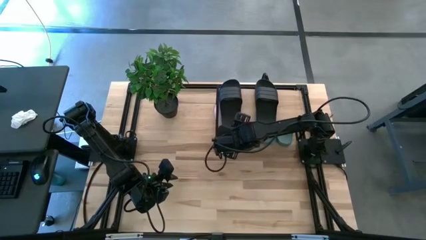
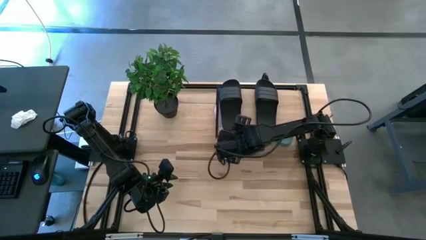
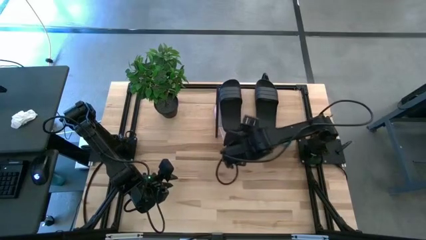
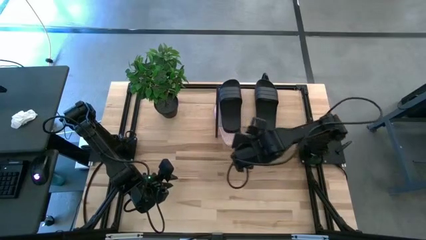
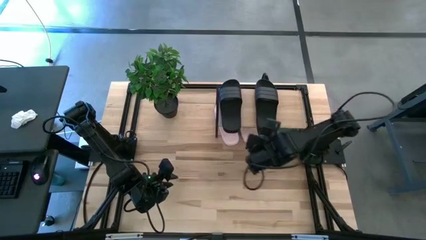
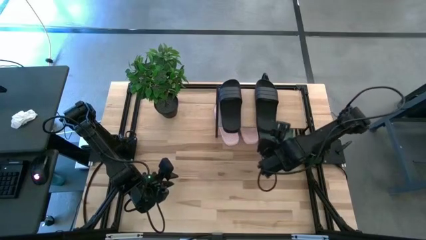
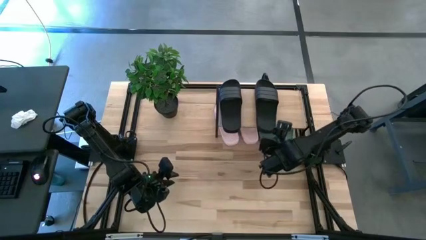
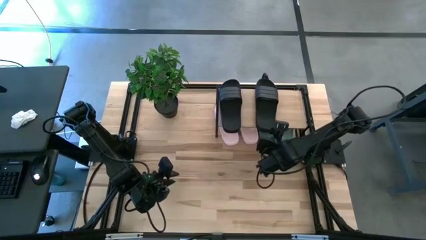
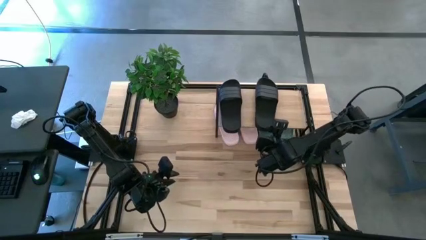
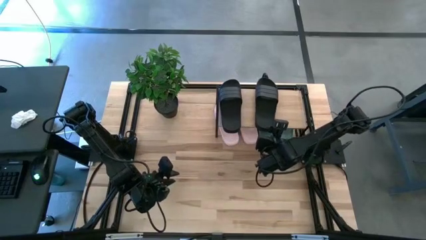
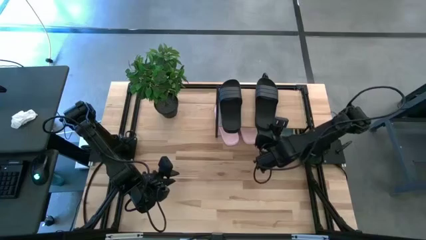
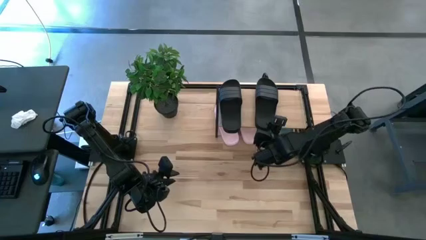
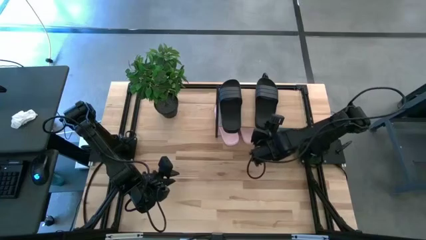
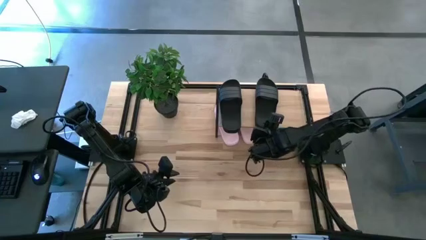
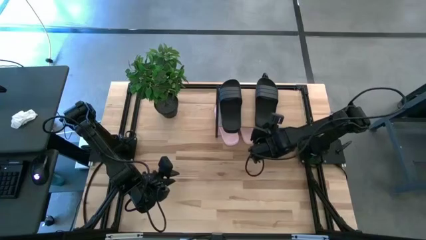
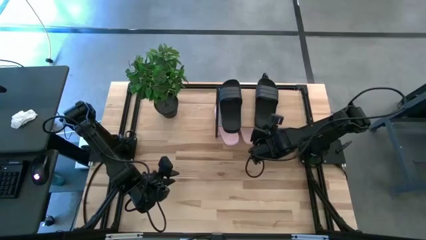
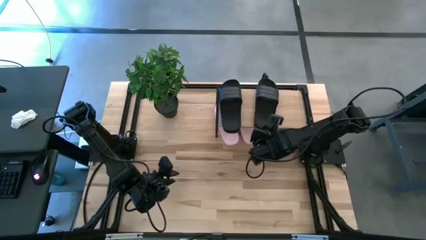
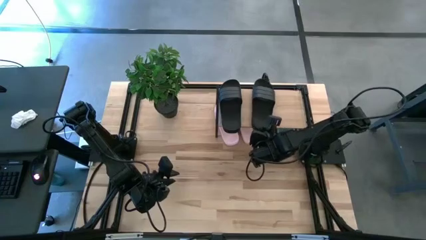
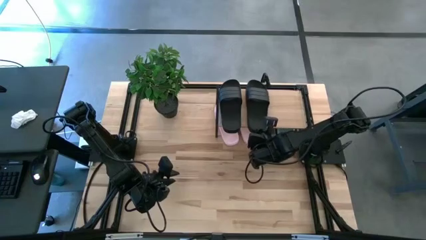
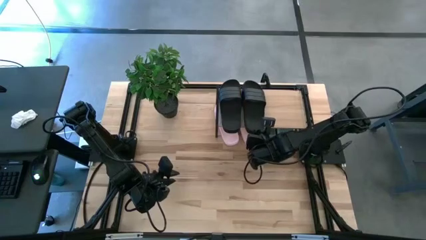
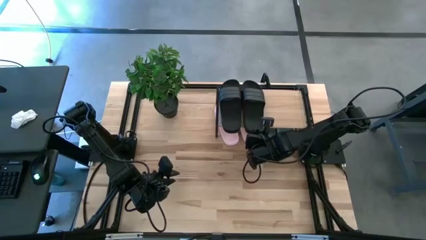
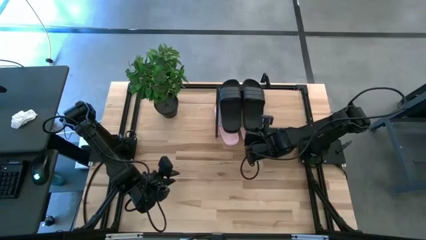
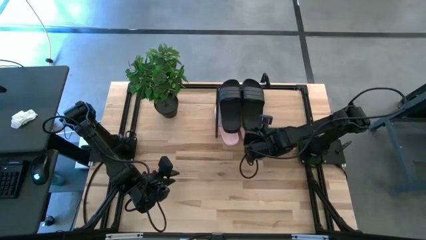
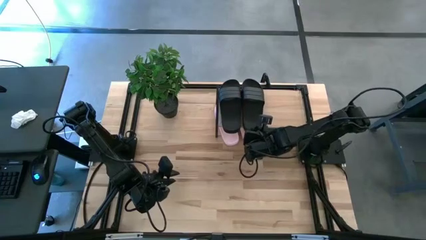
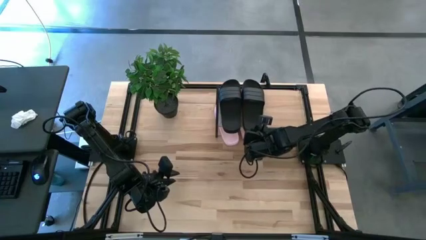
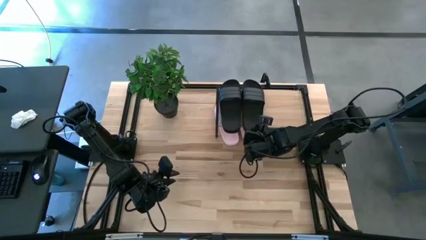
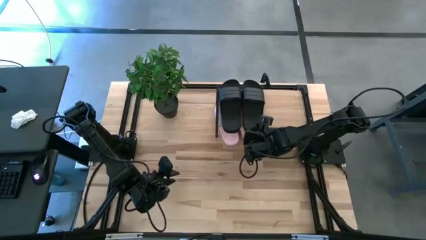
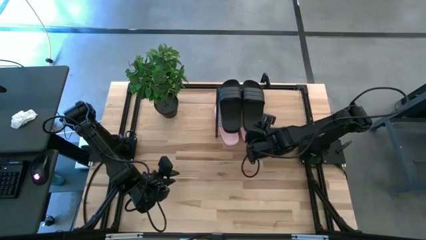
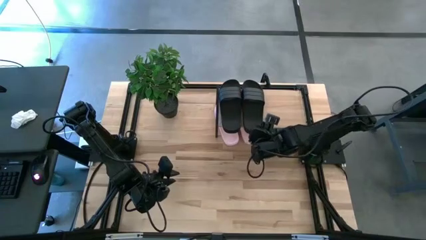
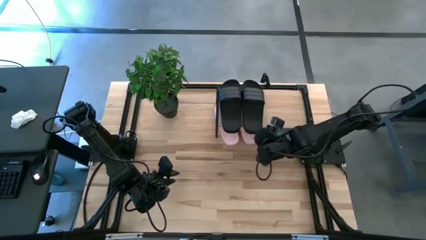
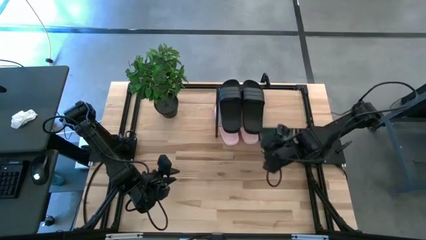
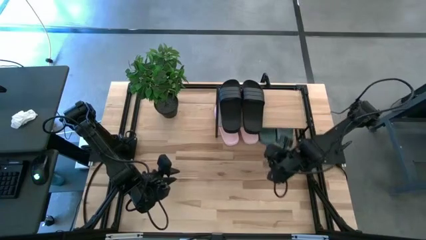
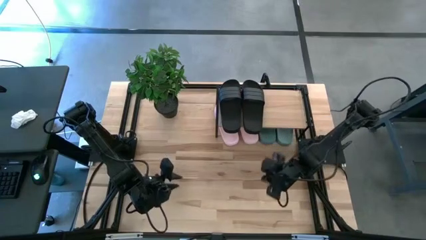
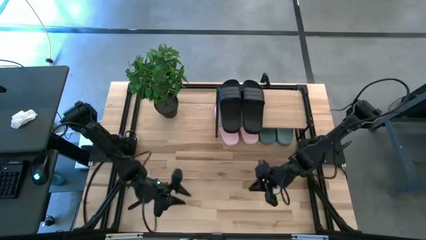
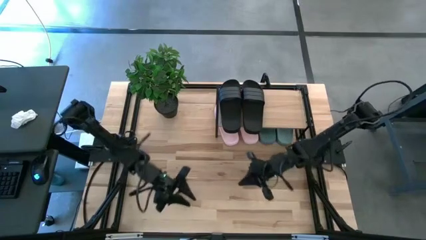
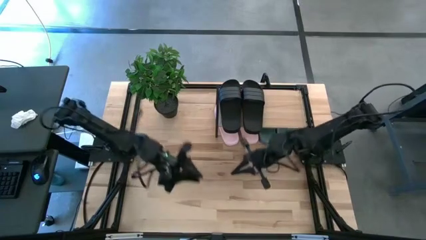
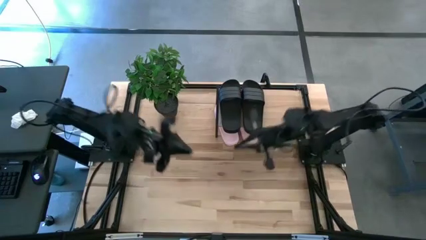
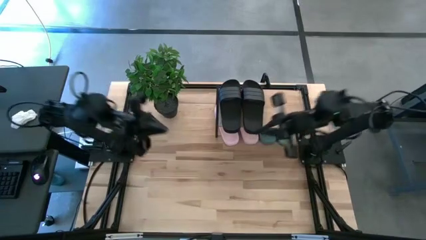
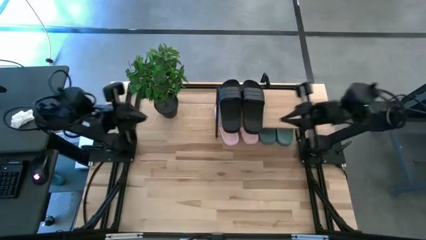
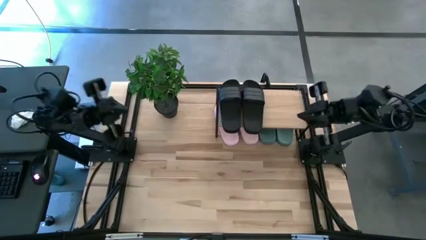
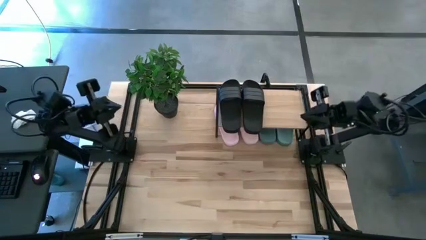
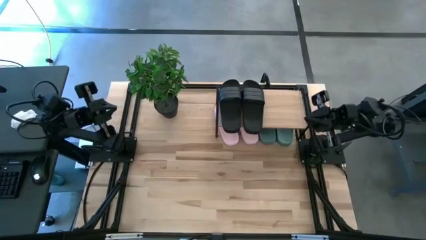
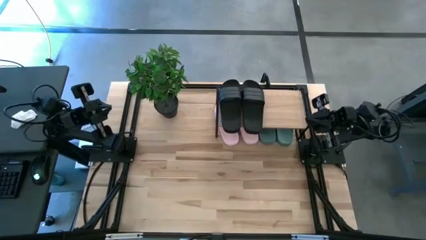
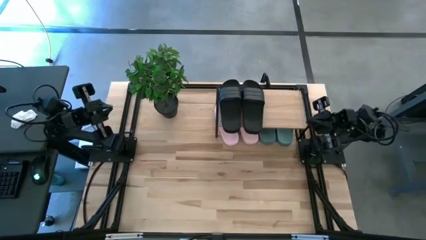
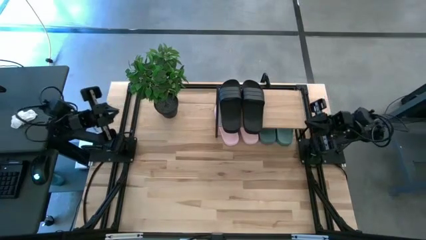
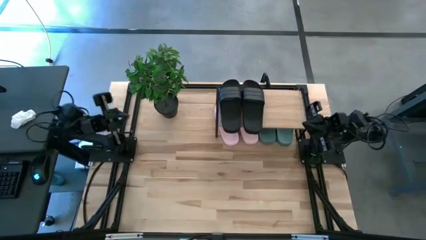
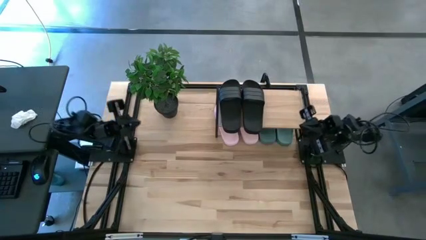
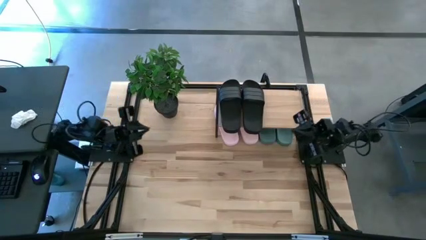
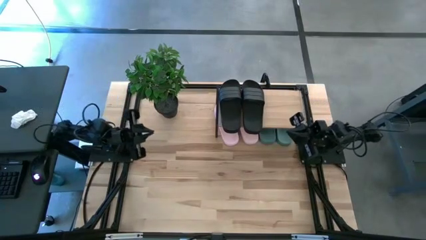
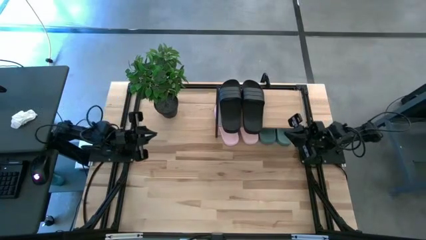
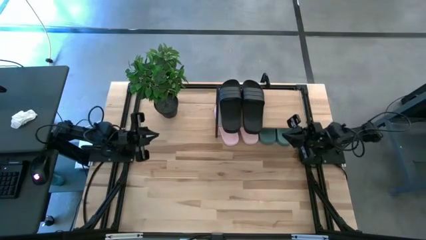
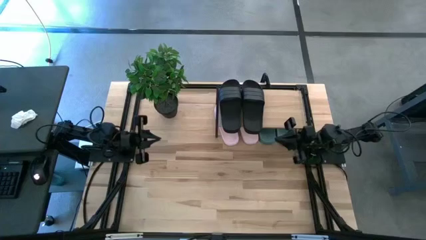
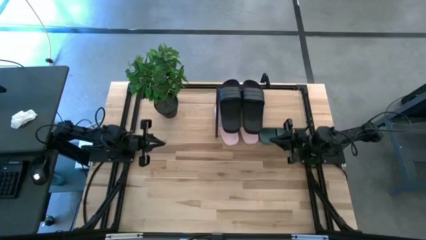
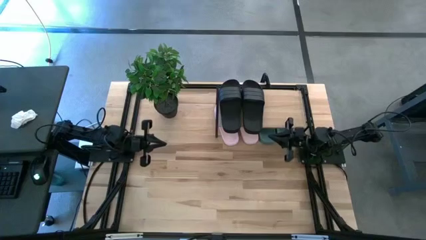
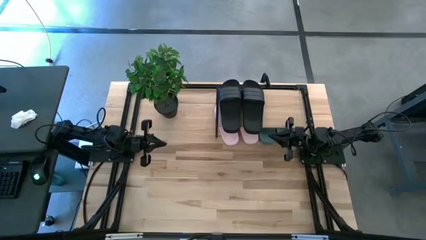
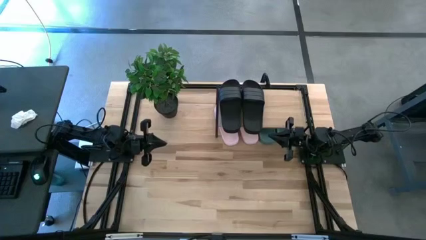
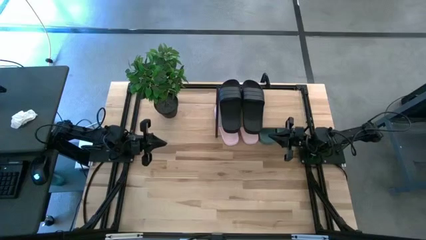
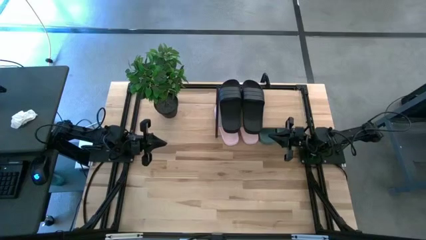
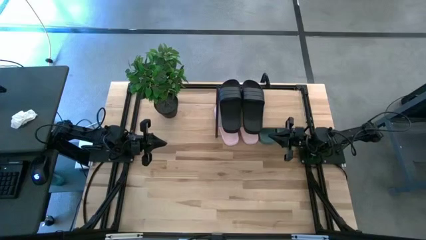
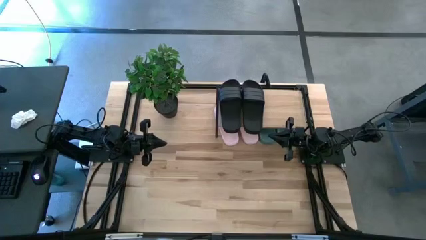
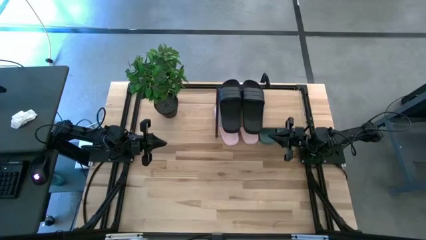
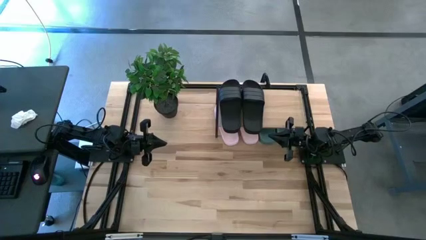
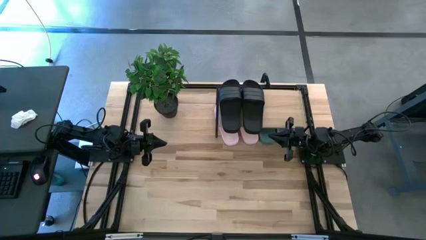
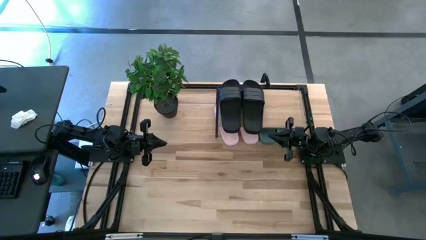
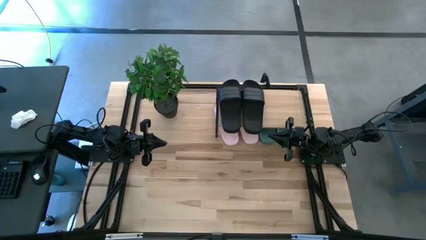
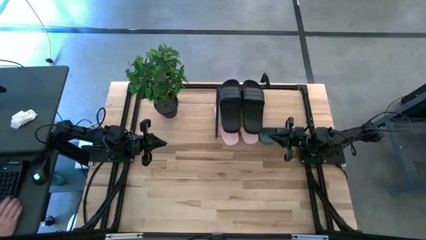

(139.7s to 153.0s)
Task: Pick and place slides into the shelf
Return to Home Position
